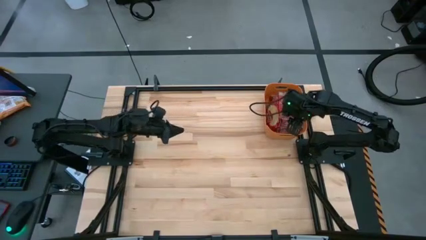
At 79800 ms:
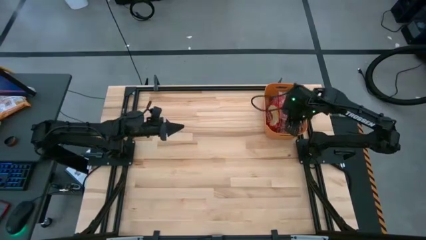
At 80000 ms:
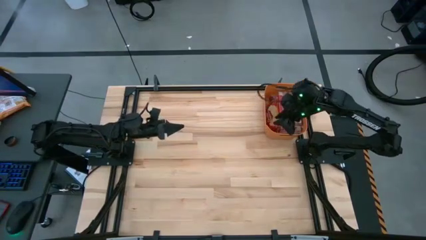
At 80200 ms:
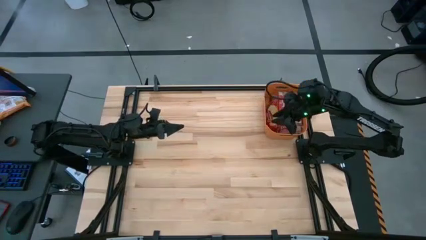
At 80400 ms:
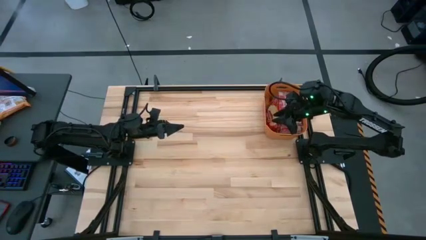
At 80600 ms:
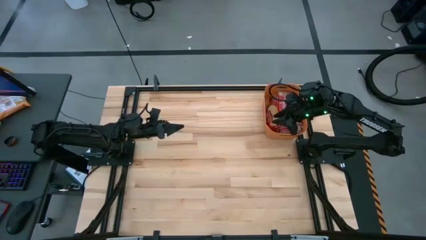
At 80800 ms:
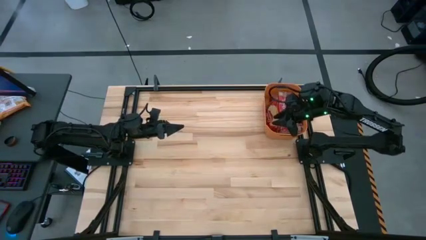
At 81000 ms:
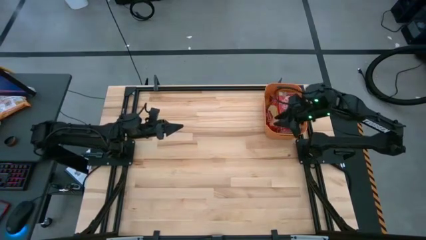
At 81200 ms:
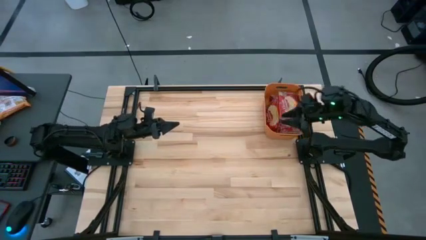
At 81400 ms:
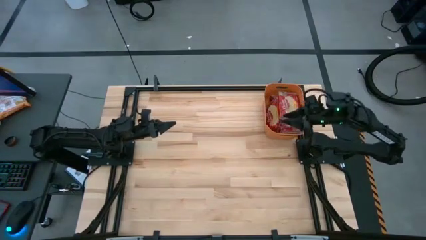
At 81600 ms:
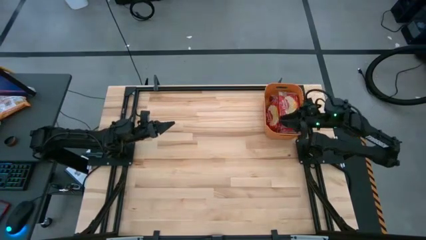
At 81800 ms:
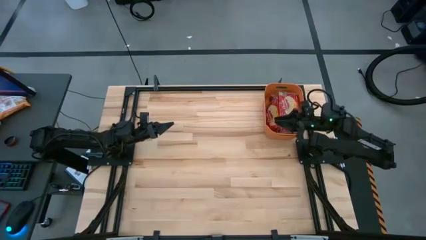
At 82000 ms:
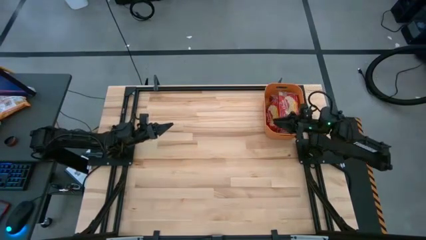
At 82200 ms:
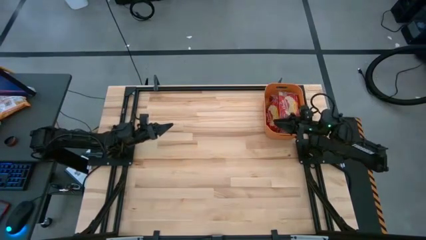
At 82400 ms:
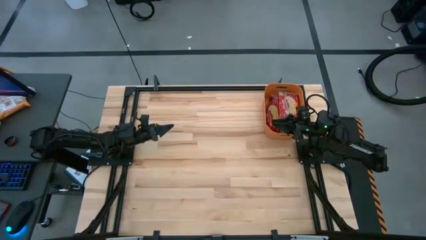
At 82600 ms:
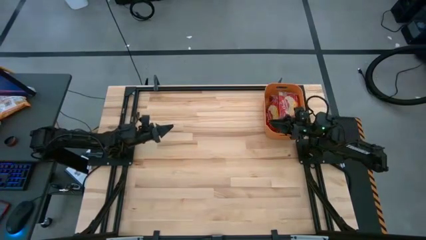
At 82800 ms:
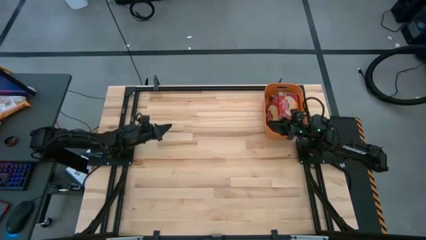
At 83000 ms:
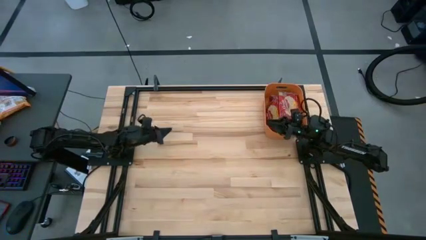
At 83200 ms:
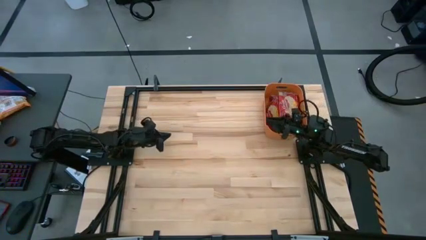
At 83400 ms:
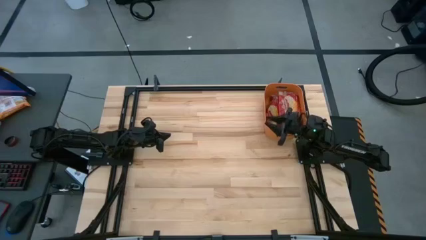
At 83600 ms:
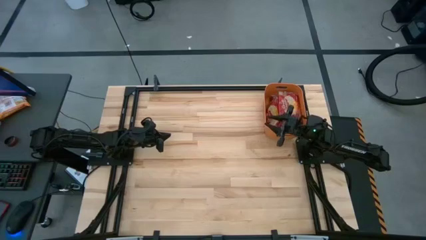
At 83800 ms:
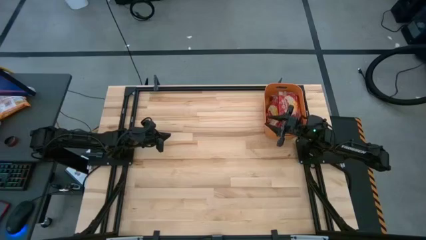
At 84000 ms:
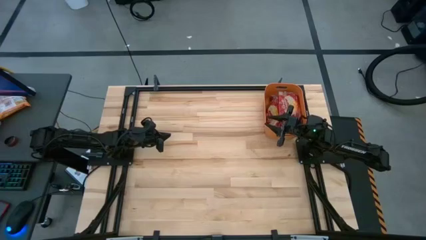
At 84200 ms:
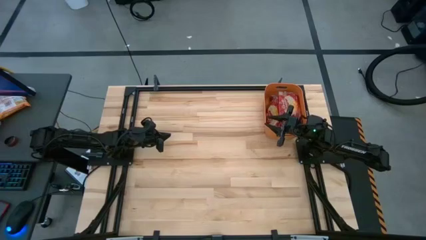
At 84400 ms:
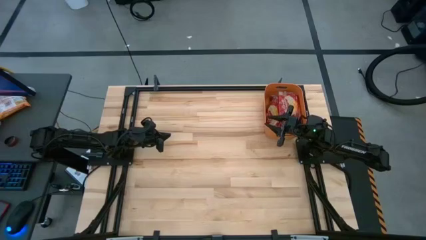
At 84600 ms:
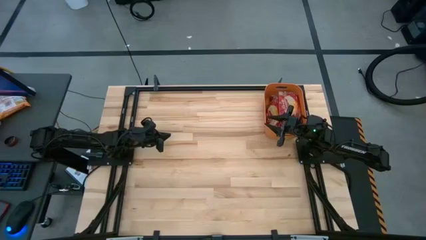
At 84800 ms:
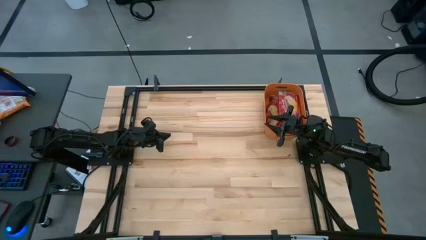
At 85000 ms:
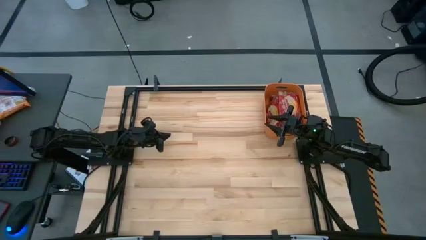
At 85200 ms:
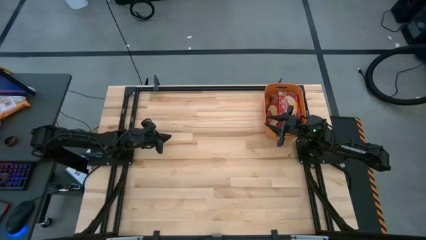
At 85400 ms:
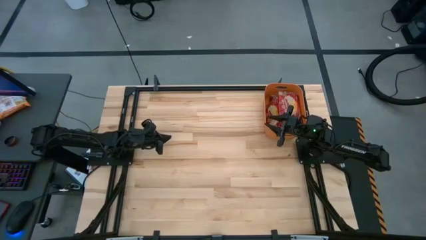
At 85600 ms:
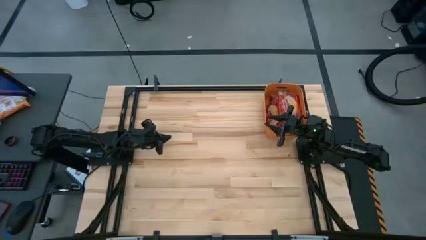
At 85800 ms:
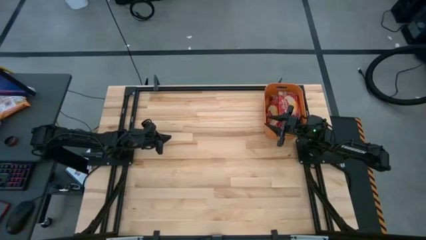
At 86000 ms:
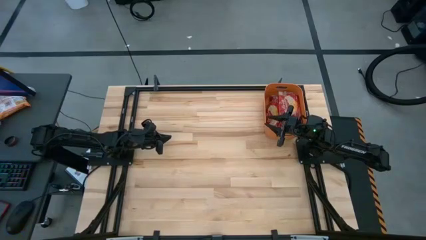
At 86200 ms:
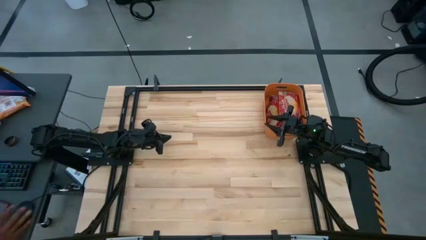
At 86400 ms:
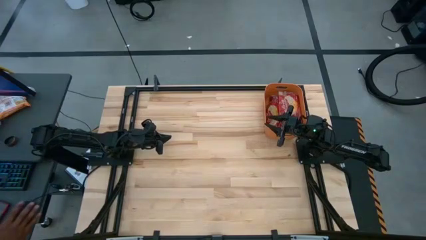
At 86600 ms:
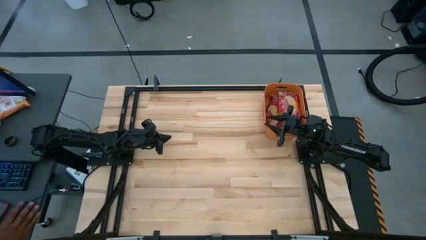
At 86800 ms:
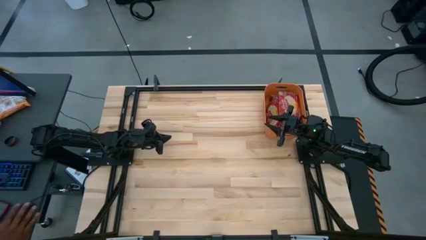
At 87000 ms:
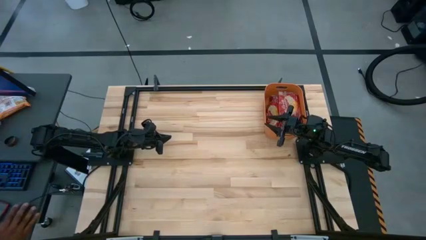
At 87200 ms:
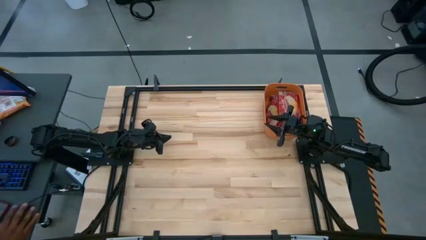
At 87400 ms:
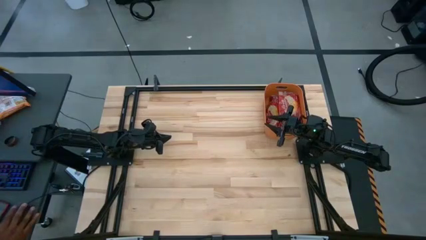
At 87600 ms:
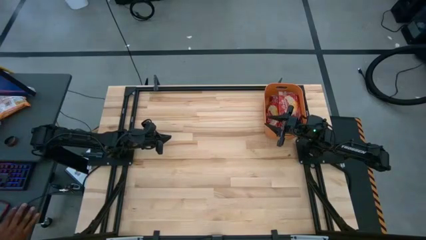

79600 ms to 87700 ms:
Task: Sort popcorn bags into baskets
Return to Home Position

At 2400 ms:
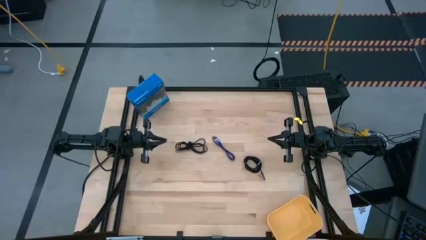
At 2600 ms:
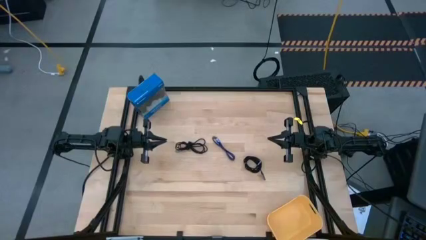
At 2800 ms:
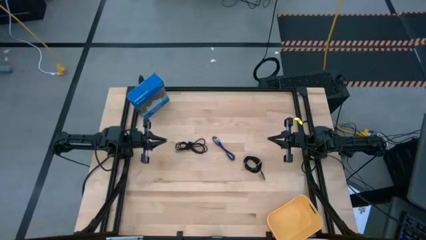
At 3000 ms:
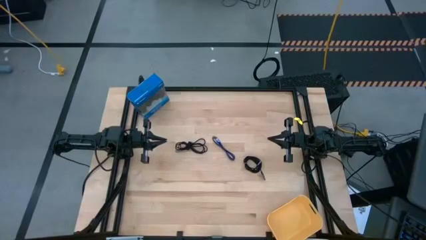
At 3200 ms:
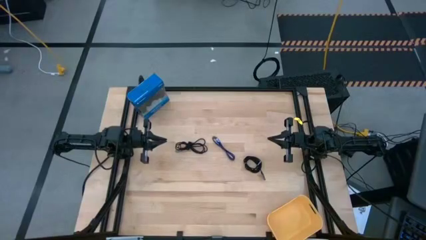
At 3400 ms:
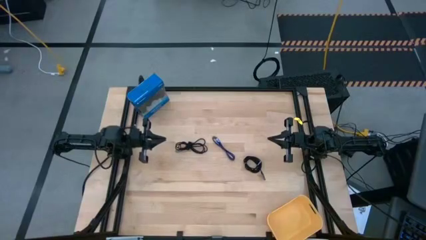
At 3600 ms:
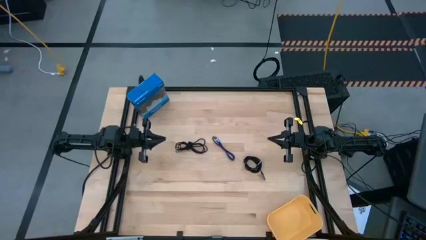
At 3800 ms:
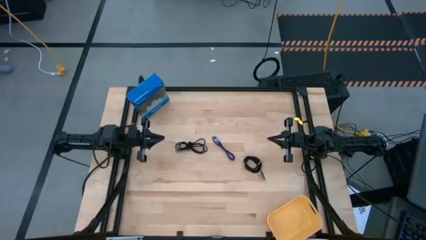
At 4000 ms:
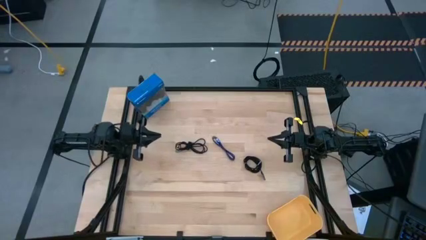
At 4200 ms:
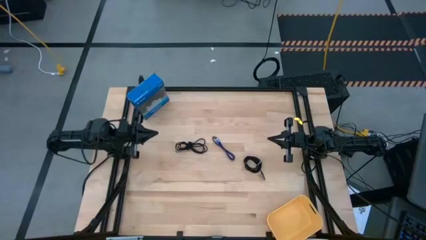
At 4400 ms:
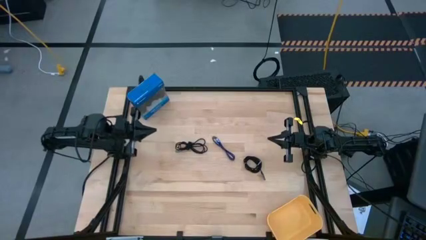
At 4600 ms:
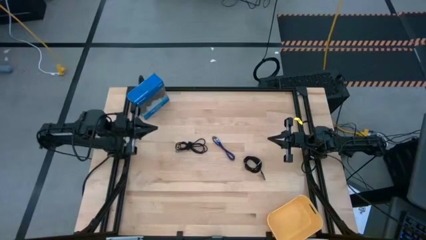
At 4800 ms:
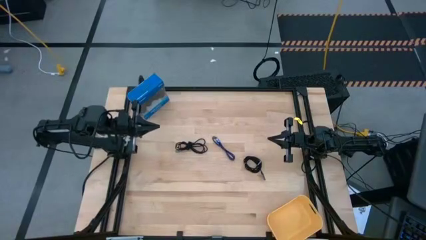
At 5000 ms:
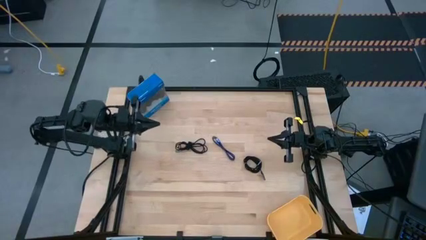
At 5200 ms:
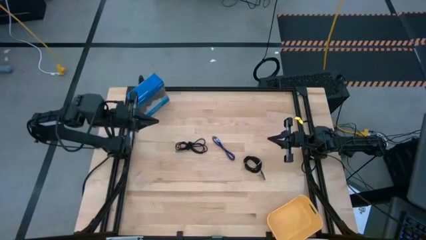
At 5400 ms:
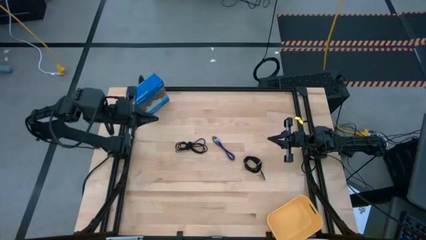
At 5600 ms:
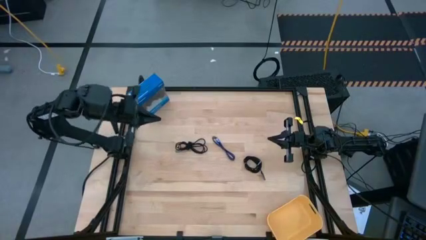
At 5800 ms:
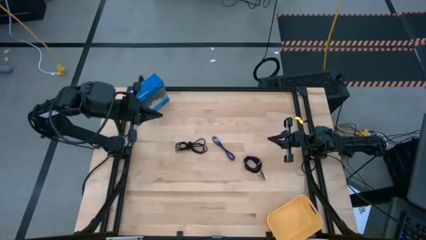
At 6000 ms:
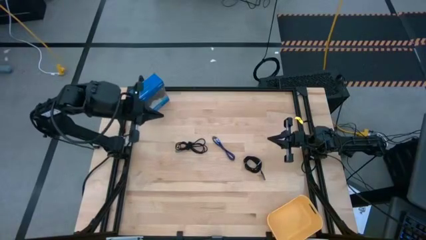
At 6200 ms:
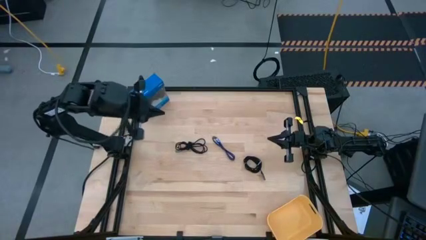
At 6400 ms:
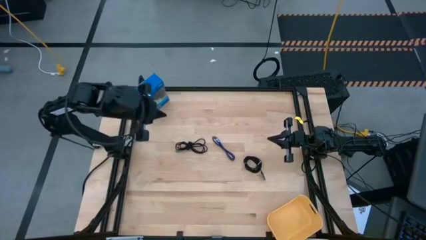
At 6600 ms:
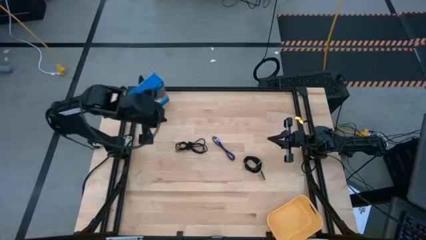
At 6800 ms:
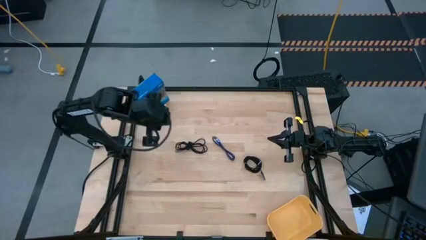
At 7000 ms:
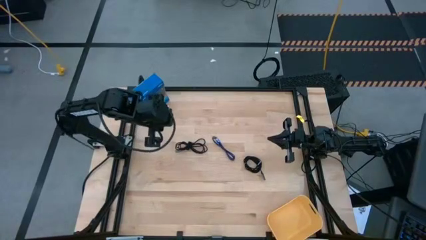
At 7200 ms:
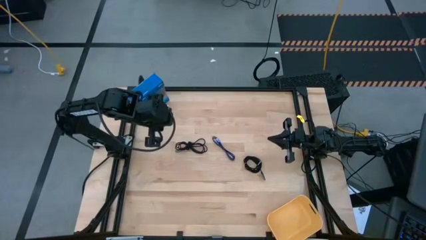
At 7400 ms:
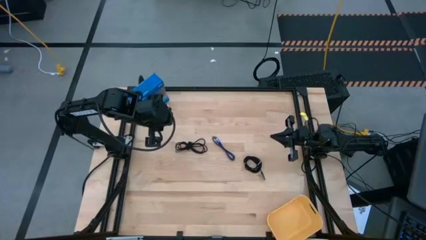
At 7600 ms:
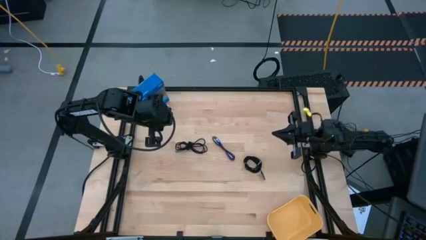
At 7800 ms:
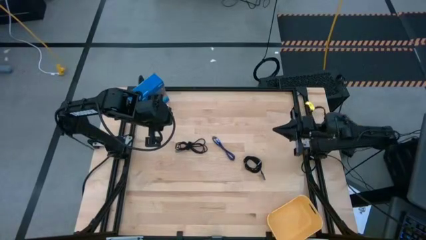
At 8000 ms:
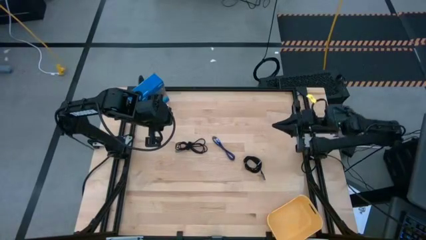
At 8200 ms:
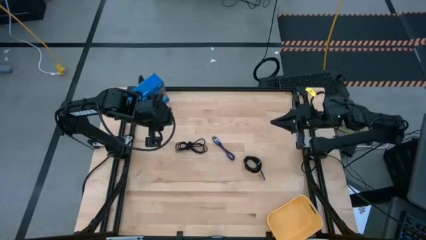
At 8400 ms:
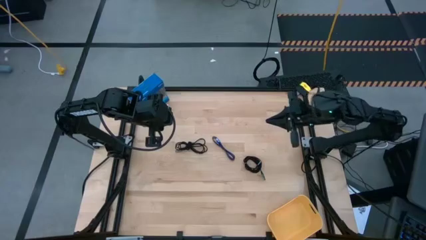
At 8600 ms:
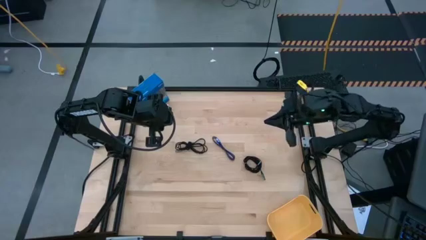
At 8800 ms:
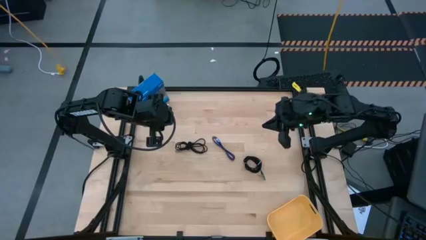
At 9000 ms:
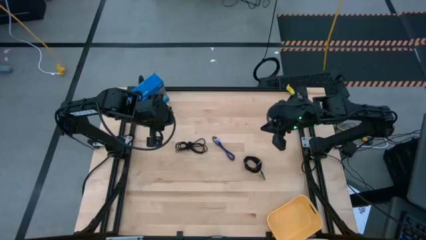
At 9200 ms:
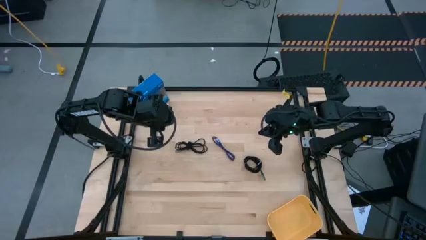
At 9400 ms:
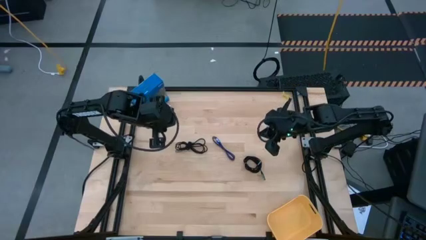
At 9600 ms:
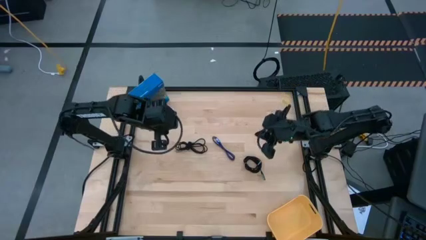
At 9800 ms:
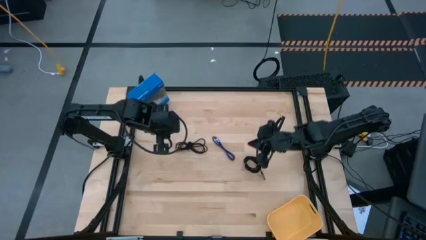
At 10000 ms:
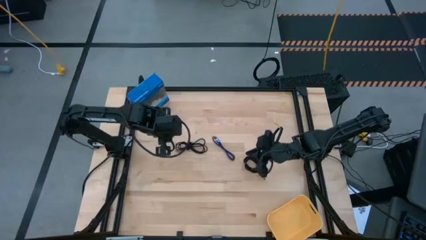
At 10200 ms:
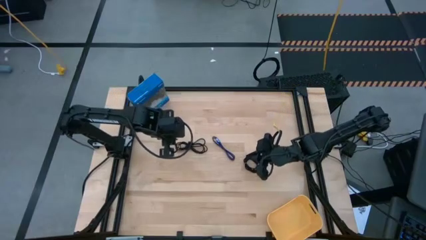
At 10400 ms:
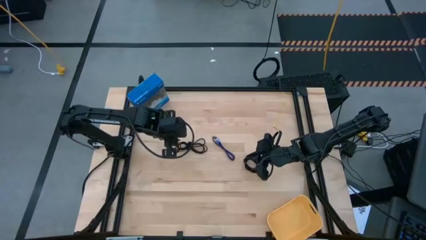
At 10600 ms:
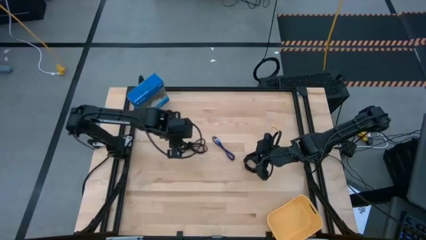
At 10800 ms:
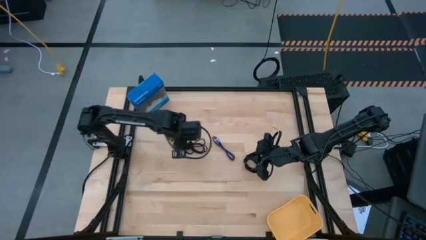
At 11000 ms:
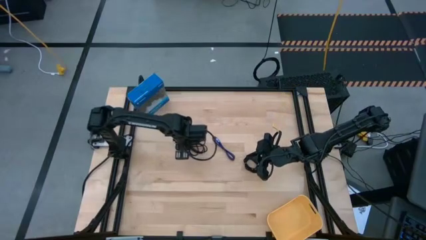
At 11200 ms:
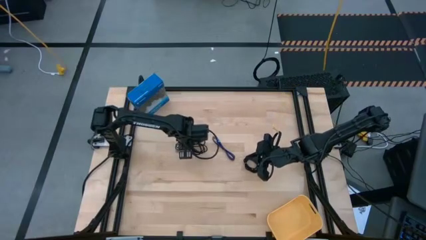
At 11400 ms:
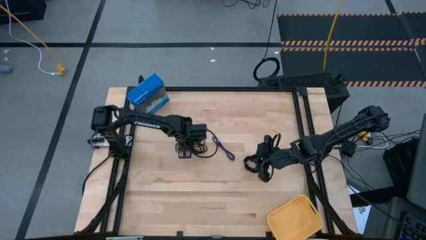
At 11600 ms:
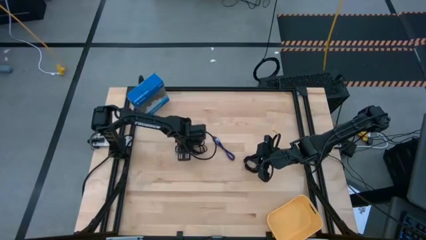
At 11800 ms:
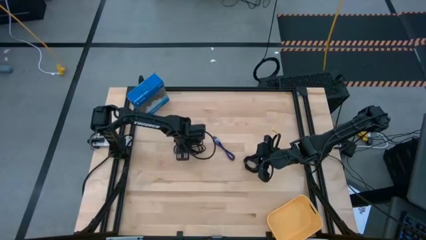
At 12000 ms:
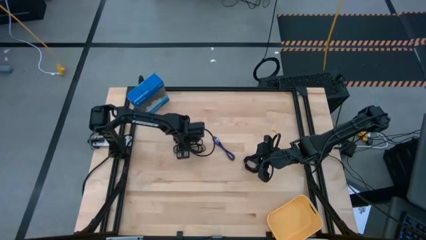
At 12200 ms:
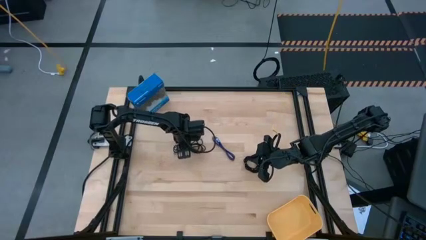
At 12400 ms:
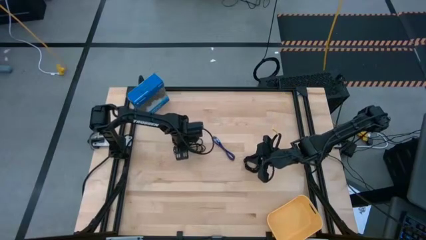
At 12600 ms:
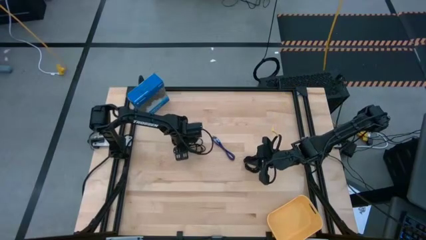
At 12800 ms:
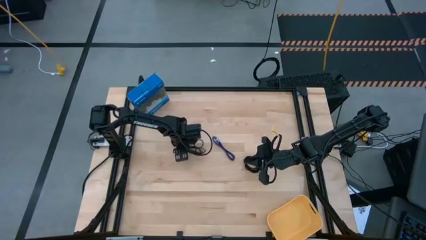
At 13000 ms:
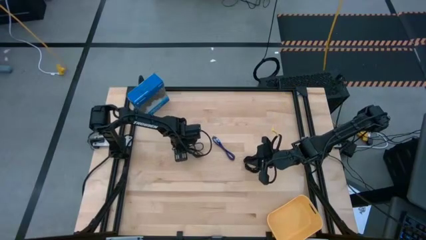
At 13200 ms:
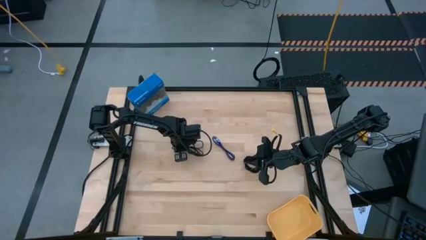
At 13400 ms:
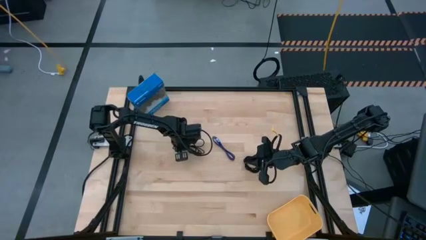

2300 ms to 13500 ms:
Task: Pick and place USB-C Cables
Put the left black charger cable into the yellow bin
